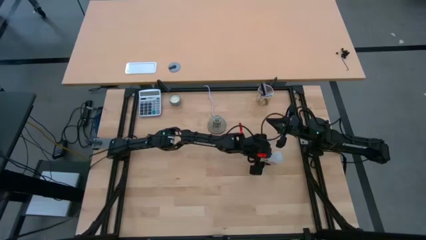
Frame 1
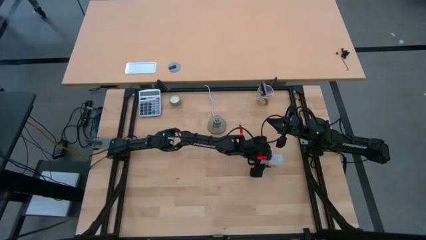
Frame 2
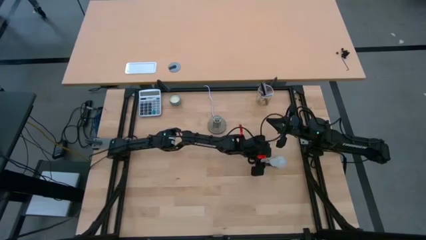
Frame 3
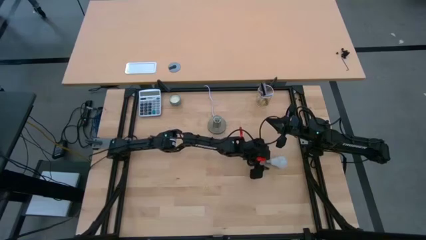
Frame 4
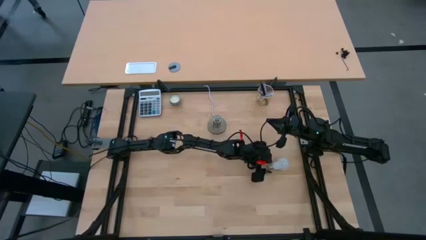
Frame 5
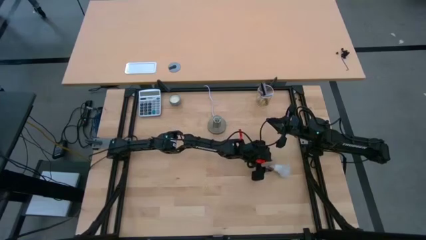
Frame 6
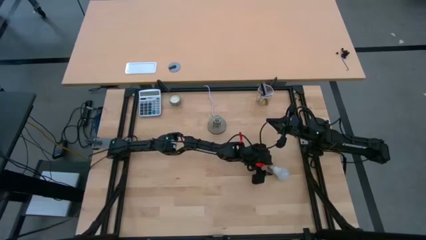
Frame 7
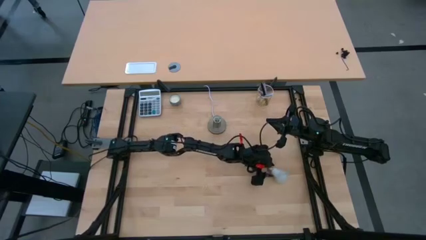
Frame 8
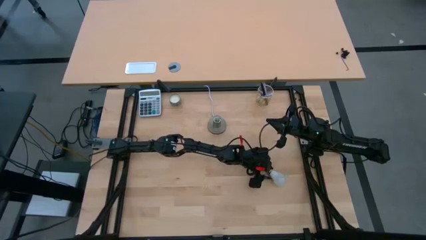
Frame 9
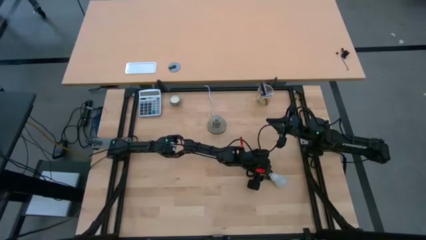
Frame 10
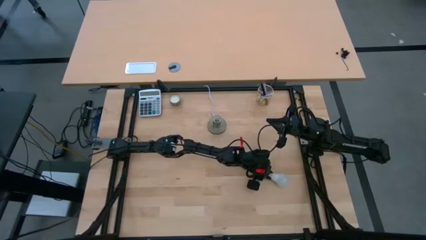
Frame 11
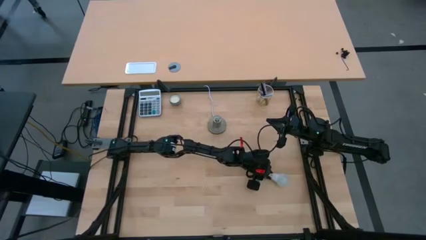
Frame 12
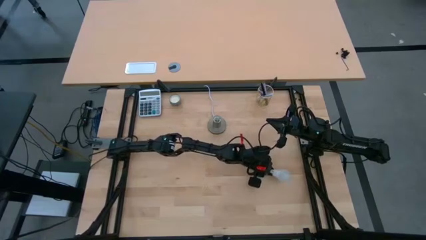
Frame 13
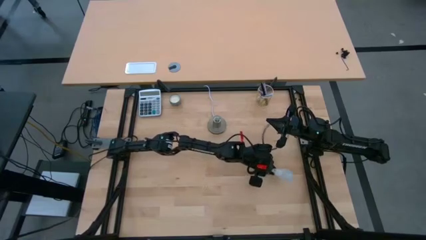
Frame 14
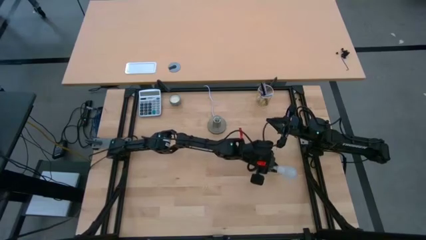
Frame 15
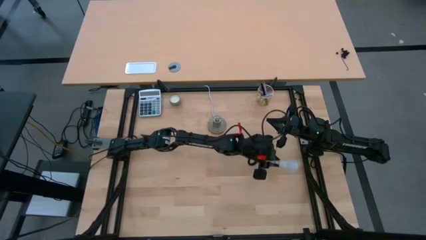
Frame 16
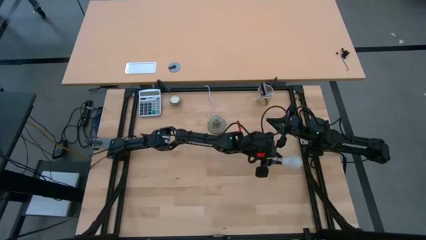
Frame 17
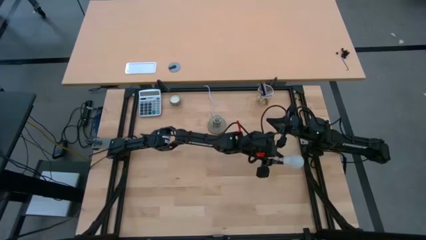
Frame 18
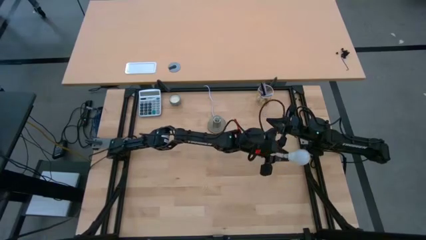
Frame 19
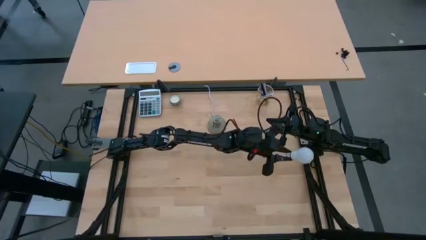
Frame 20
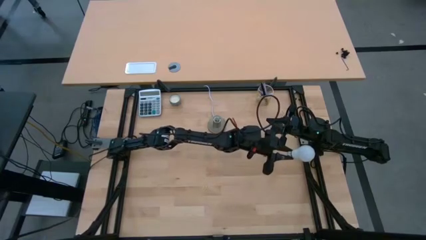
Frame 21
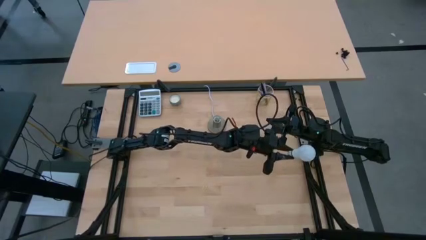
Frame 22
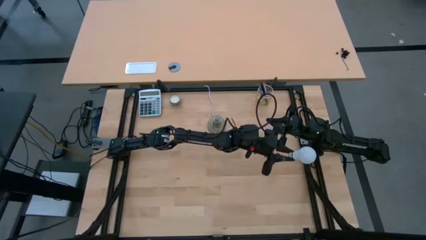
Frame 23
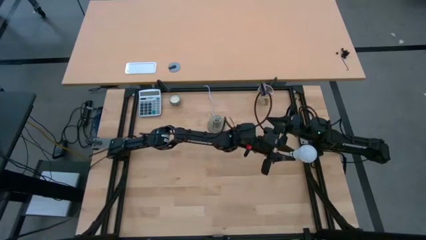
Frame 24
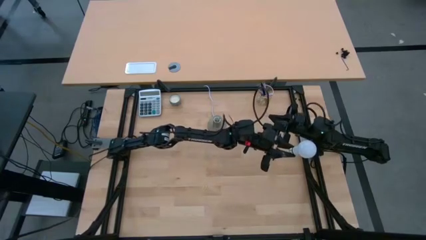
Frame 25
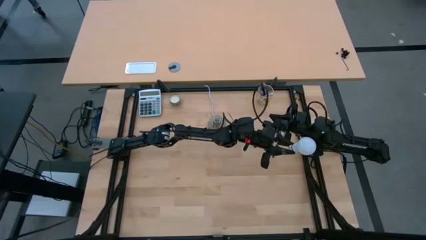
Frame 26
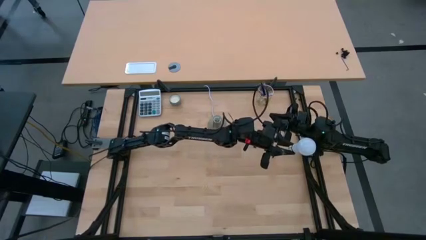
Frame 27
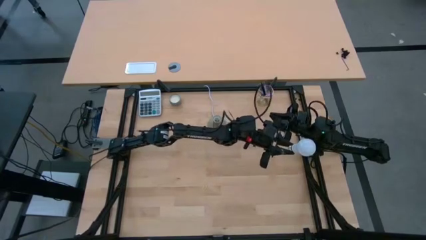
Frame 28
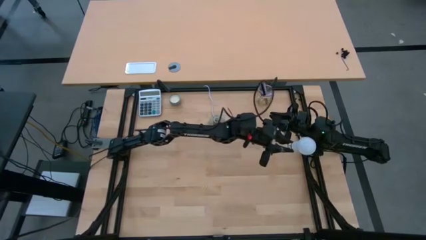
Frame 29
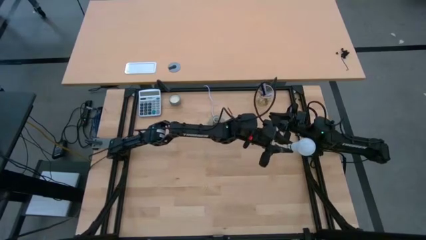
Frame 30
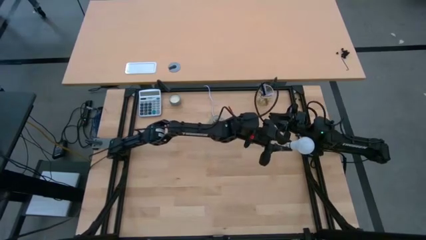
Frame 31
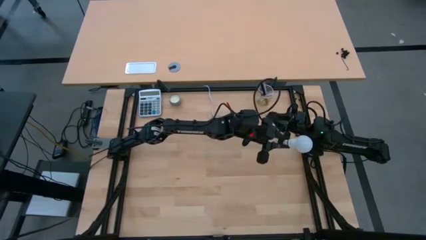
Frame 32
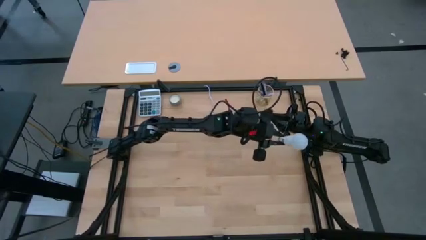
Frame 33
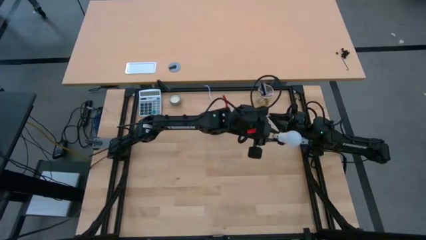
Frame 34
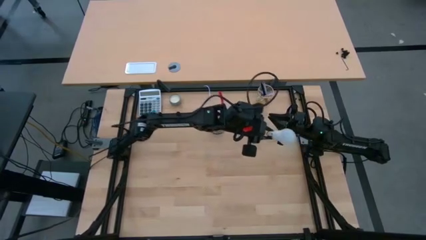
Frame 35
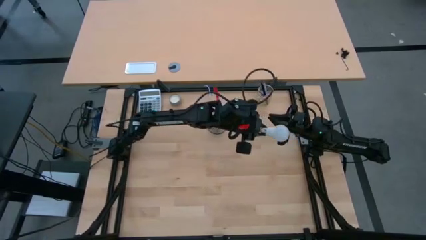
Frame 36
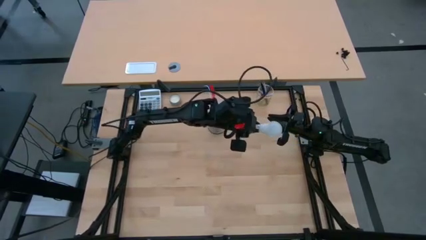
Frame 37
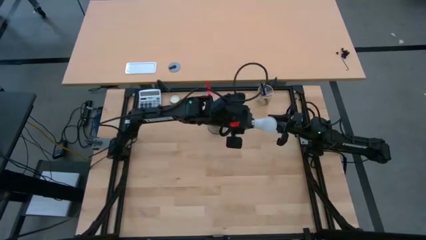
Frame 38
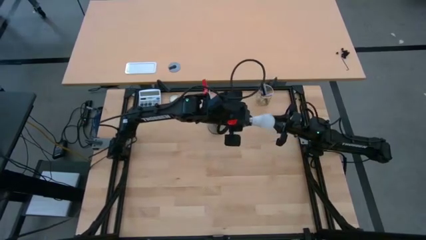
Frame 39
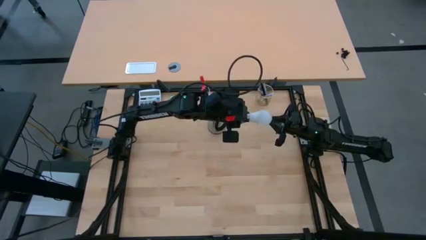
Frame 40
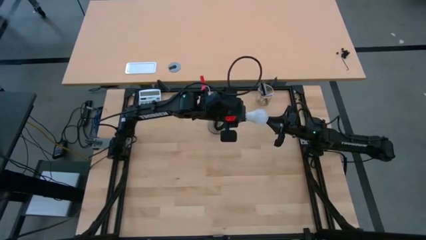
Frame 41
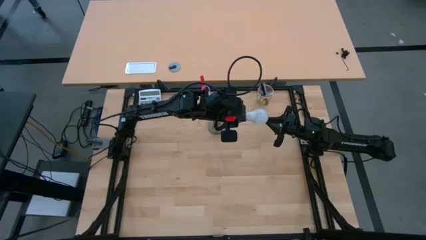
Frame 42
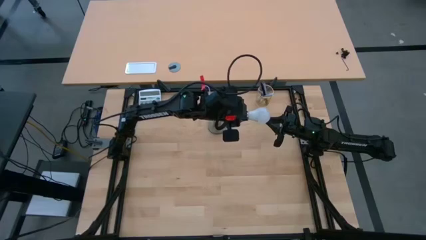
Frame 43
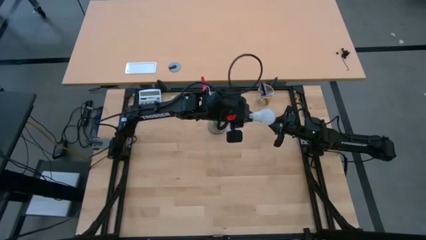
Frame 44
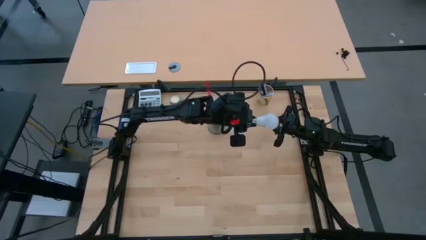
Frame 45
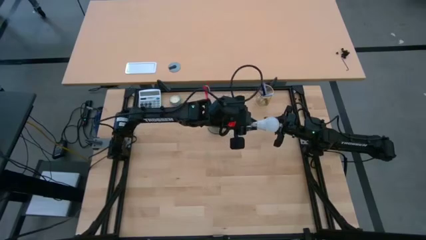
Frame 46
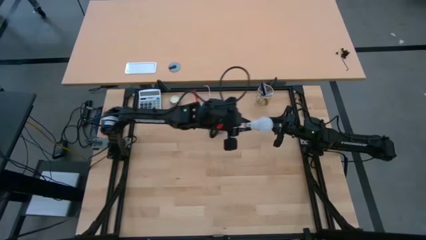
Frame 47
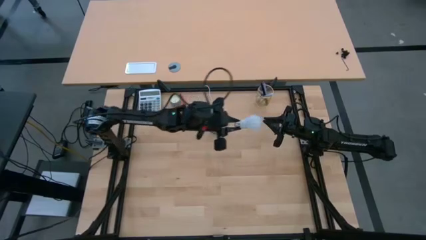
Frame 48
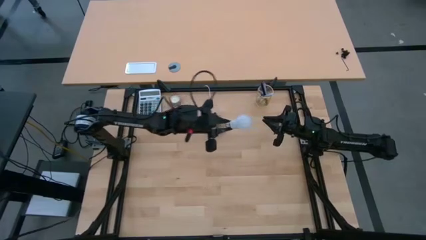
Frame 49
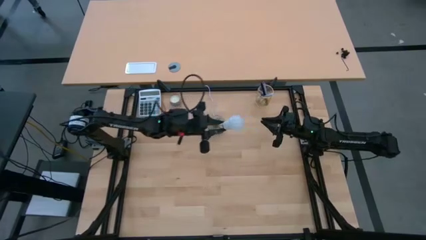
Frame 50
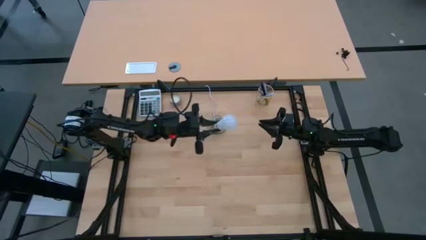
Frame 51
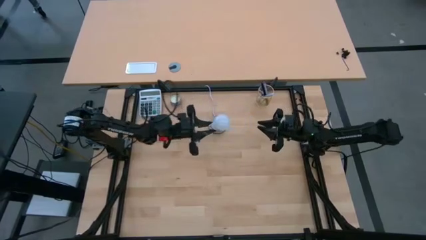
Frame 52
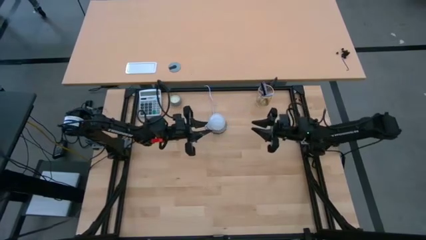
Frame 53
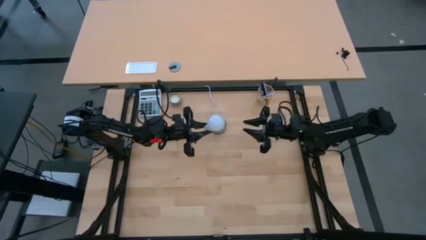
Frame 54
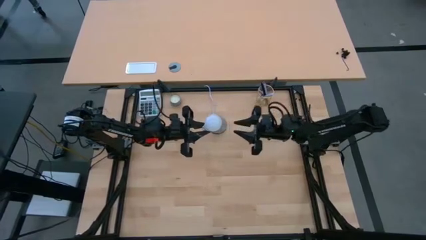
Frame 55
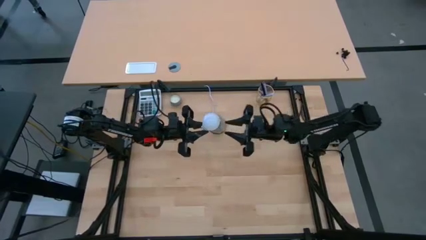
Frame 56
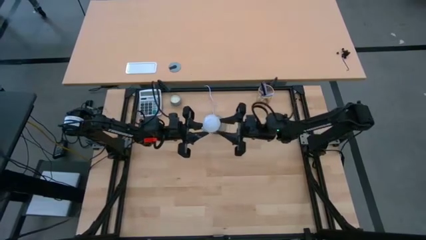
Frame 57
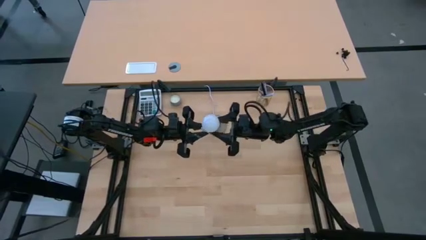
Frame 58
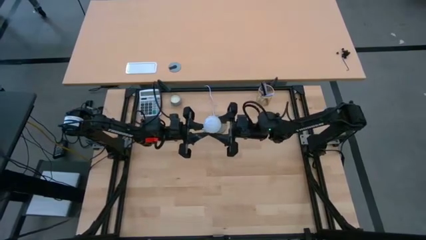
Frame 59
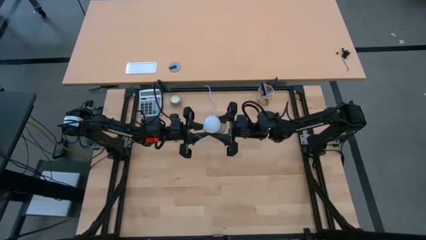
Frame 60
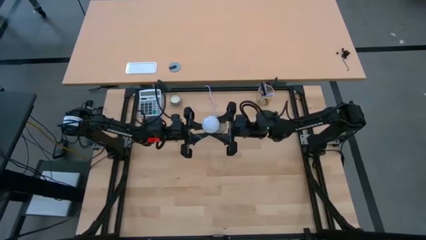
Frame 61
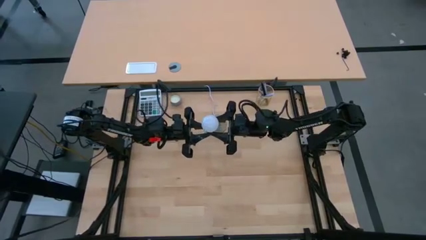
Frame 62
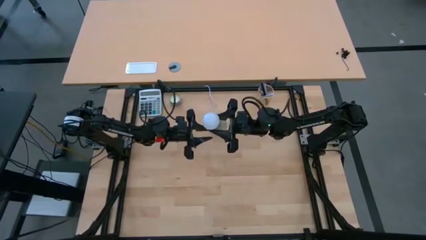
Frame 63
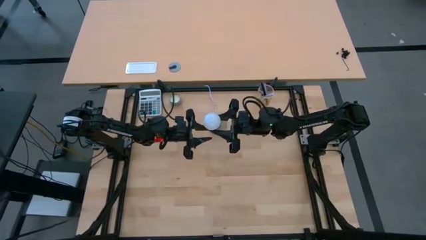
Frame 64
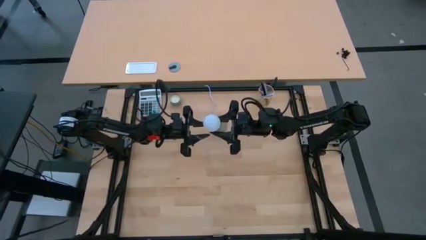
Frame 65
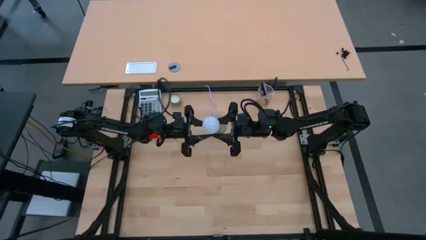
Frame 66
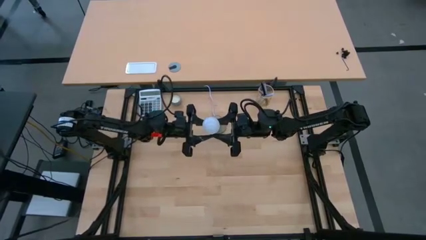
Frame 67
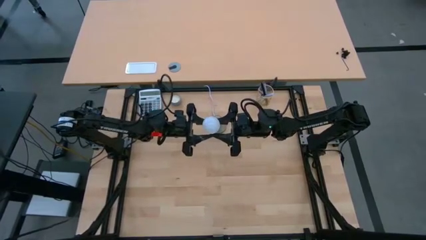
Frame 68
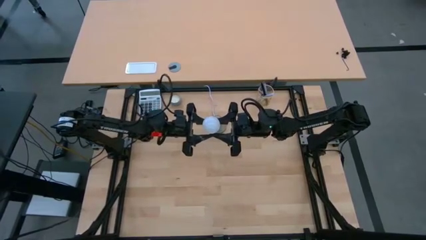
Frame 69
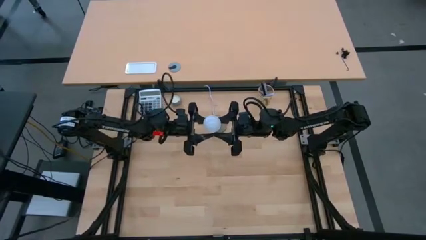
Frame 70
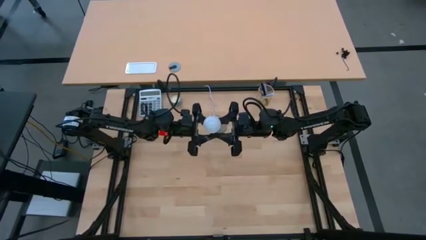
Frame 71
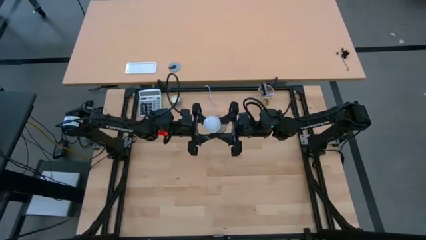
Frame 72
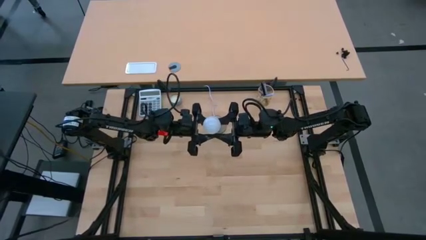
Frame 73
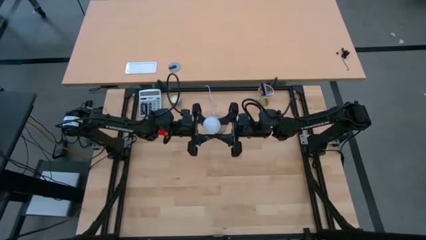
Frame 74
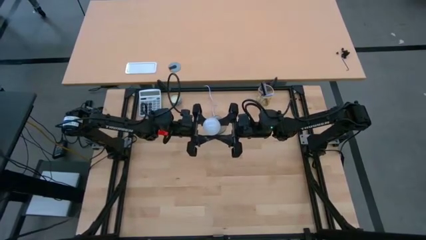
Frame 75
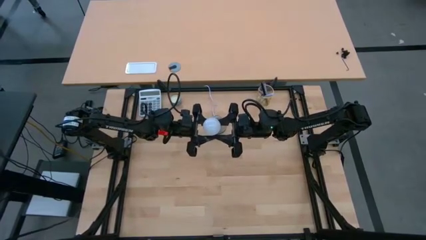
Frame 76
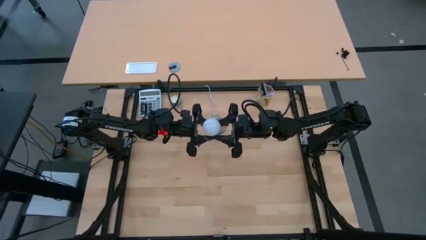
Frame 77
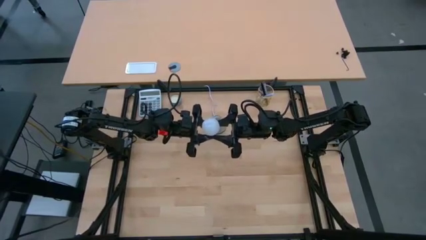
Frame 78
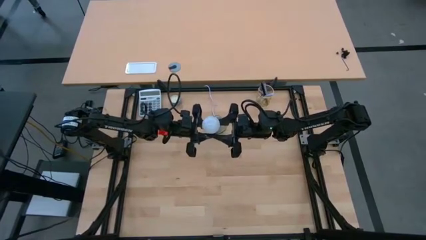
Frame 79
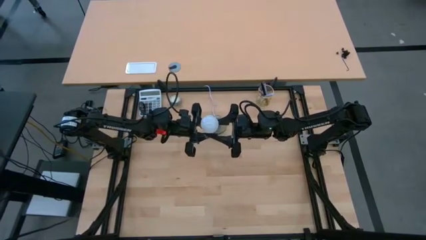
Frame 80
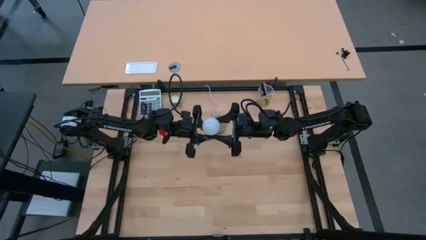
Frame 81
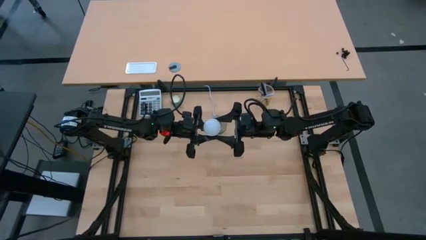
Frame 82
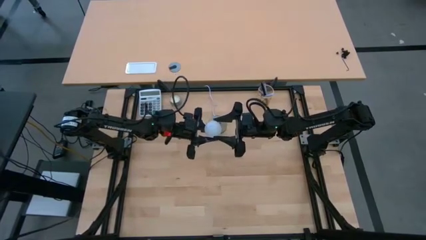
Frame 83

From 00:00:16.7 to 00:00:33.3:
Task: Screw lightbulb
Insert the lightbulb into the lamp
